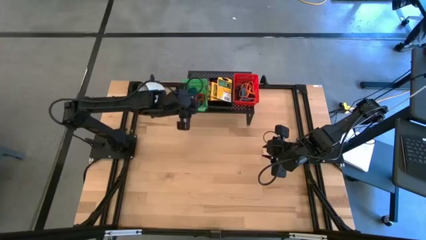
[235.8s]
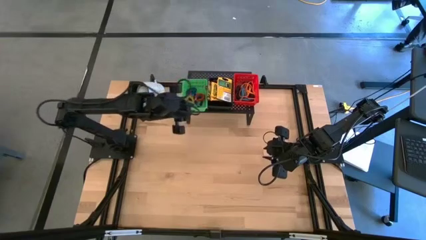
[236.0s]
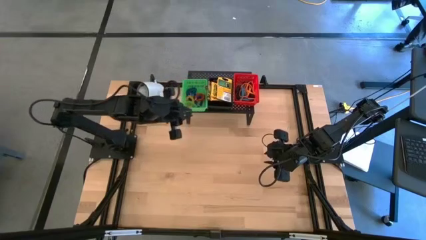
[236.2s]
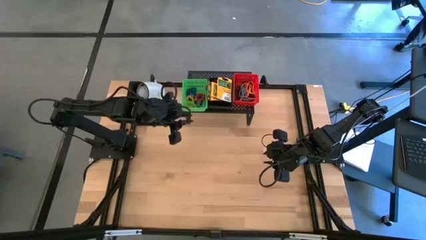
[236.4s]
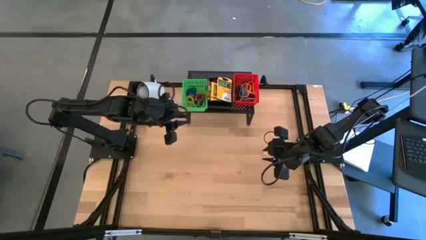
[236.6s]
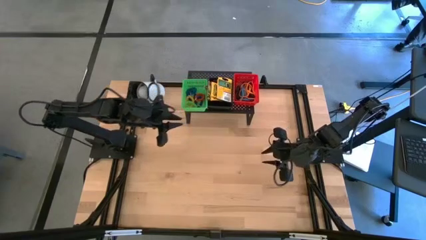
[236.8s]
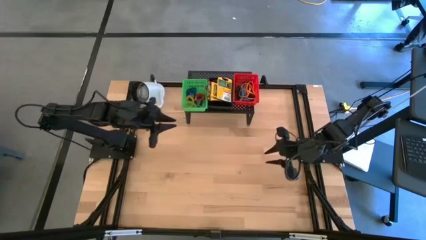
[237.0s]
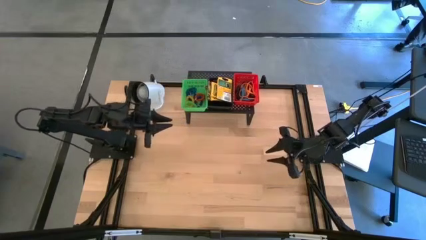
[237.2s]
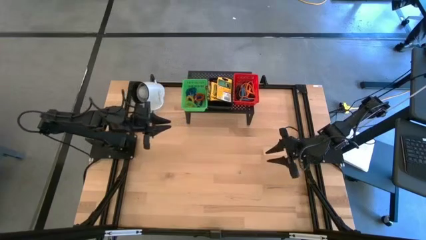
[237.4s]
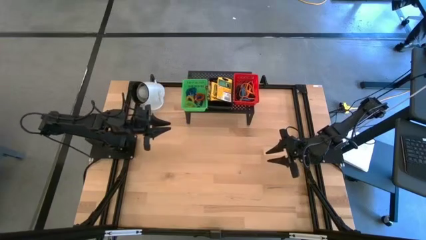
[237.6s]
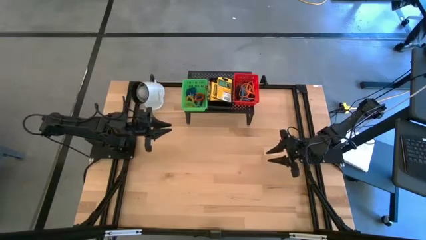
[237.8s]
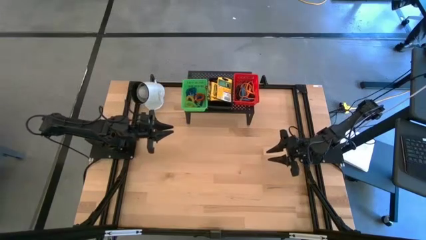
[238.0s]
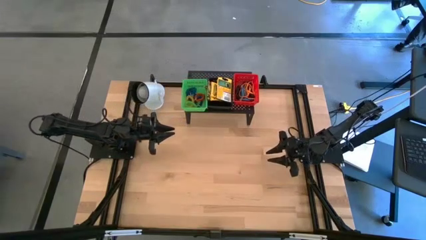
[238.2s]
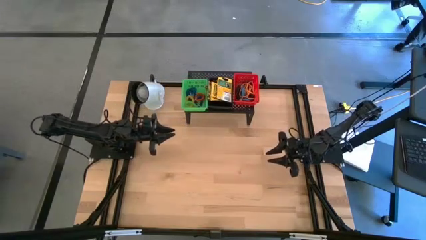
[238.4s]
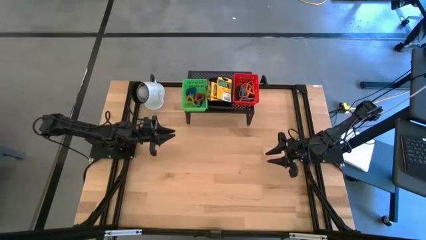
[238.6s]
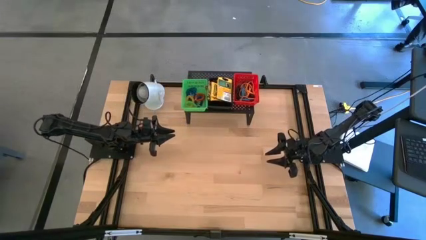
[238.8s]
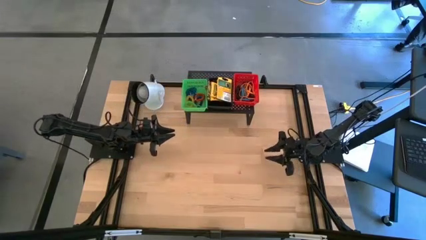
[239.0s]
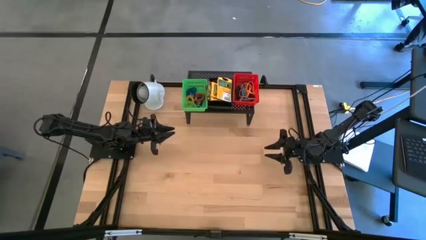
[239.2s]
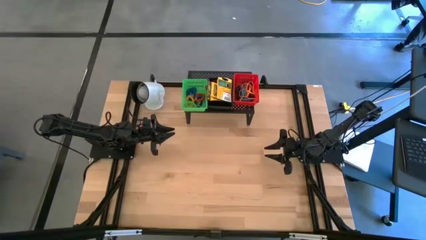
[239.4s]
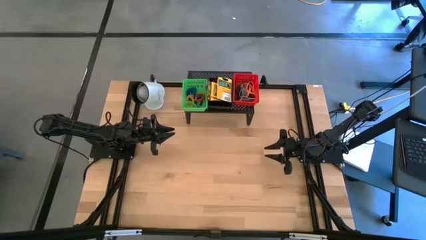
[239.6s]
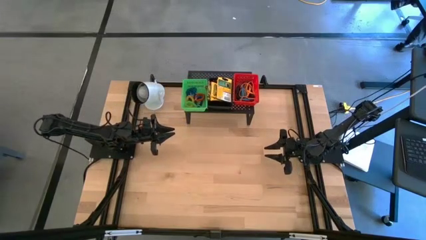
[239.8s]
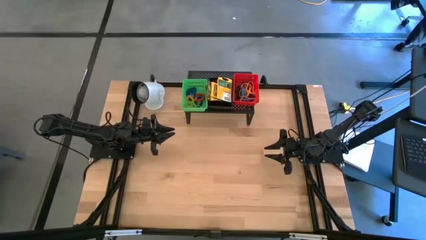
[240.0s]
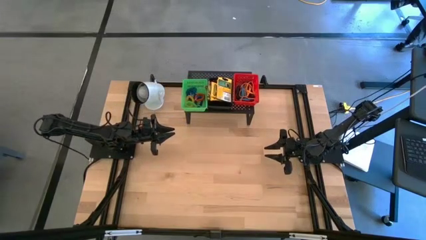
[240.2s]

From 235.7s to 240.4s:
Task: Pick & Place Office Desk Supplies
Return to Home Position

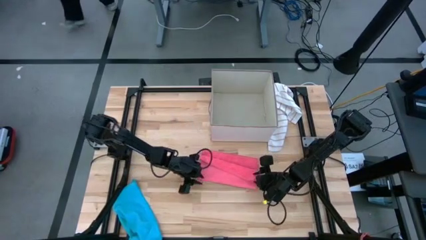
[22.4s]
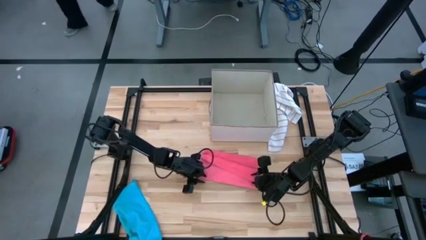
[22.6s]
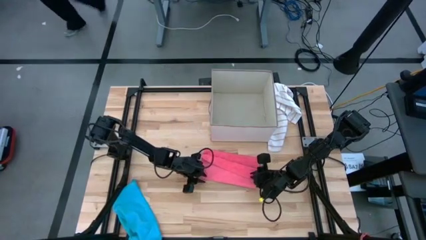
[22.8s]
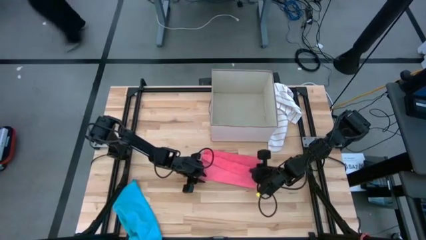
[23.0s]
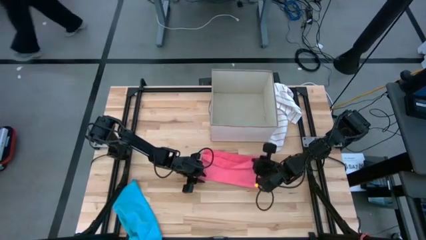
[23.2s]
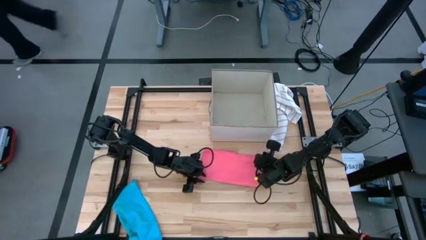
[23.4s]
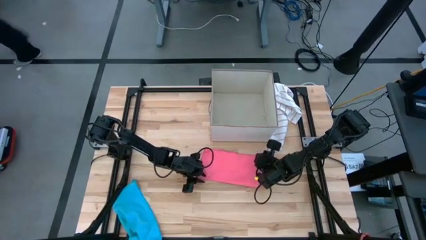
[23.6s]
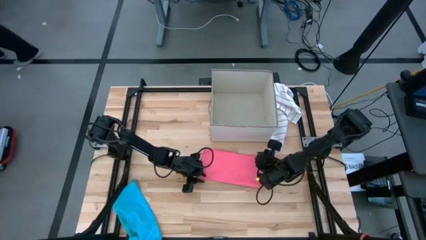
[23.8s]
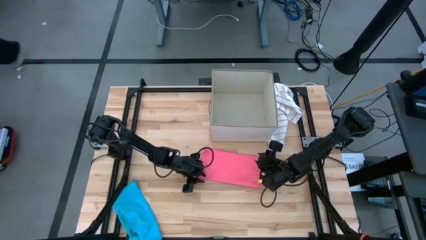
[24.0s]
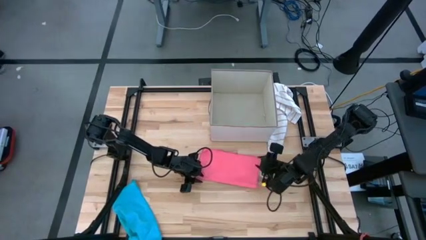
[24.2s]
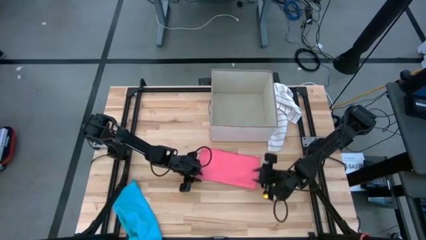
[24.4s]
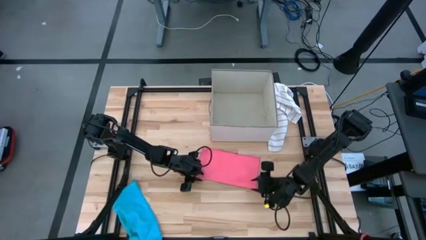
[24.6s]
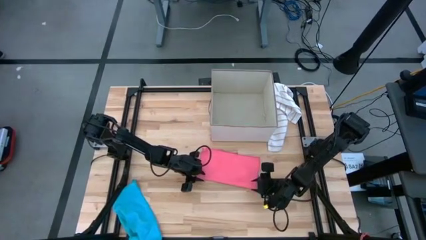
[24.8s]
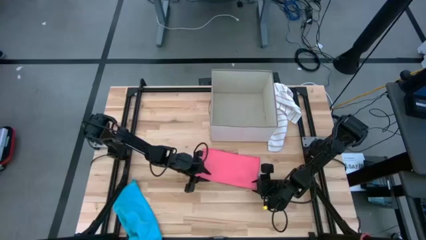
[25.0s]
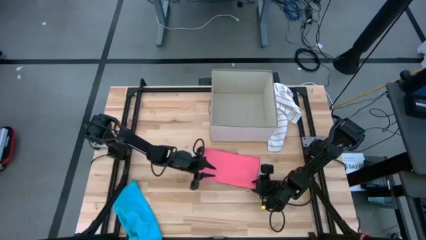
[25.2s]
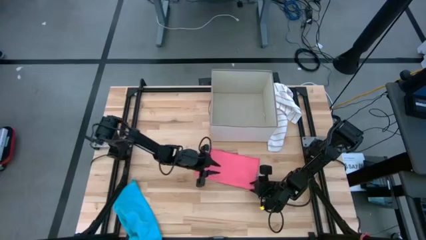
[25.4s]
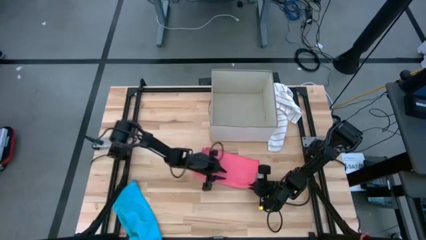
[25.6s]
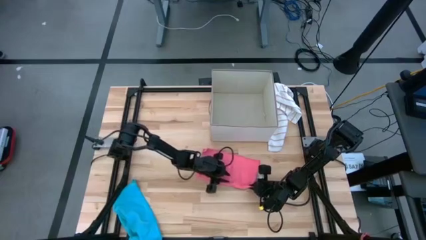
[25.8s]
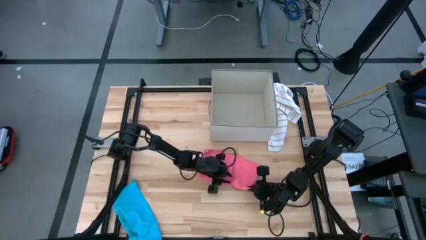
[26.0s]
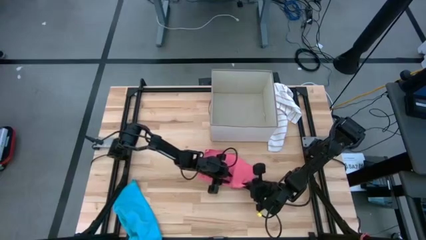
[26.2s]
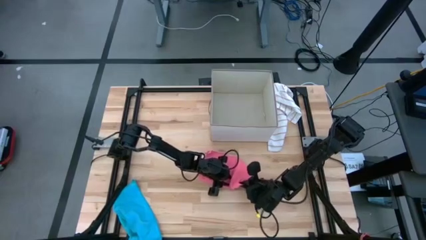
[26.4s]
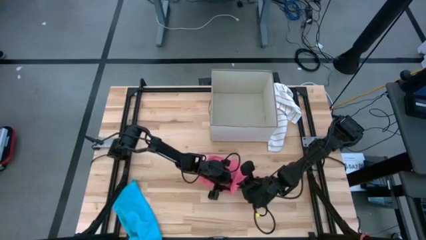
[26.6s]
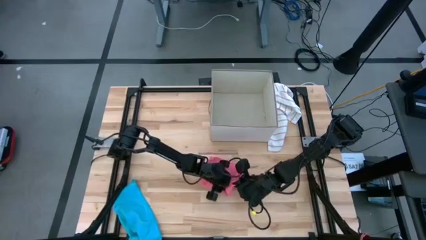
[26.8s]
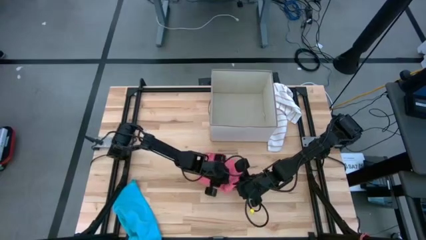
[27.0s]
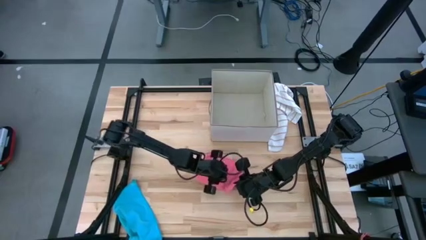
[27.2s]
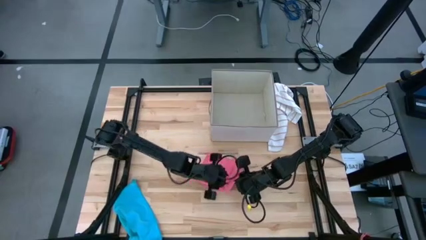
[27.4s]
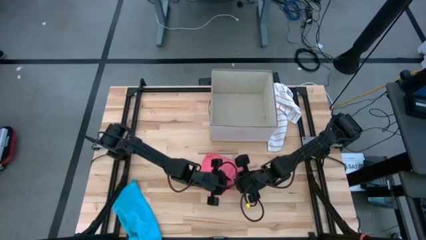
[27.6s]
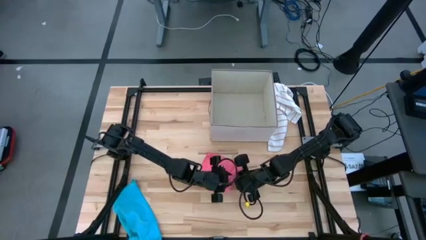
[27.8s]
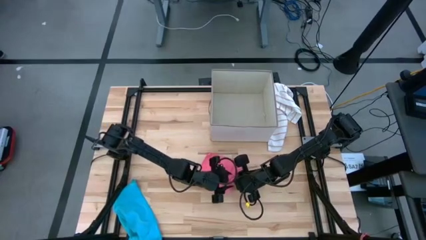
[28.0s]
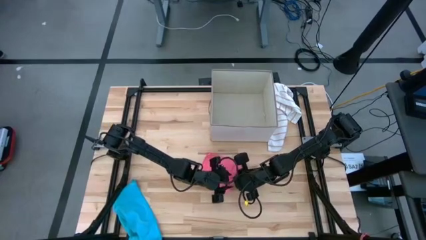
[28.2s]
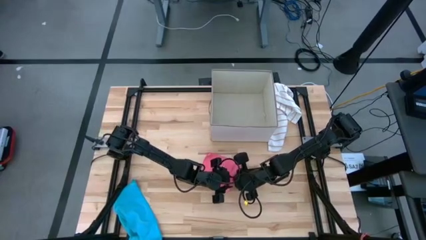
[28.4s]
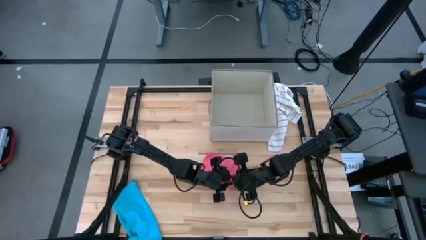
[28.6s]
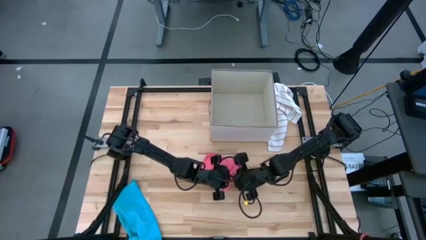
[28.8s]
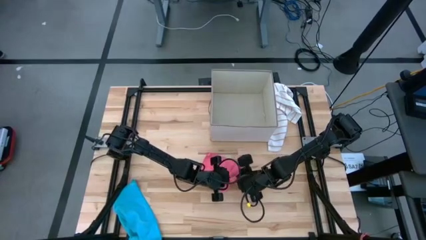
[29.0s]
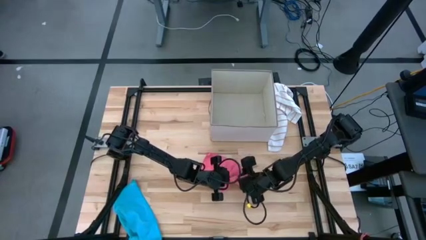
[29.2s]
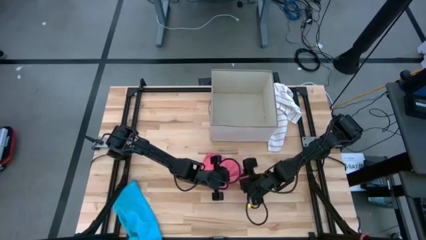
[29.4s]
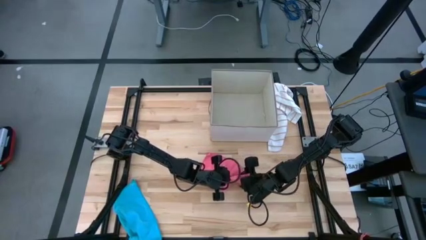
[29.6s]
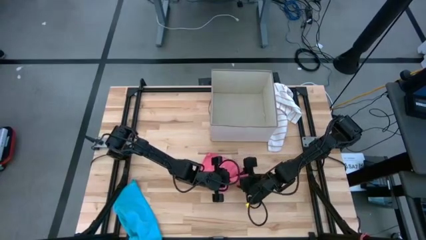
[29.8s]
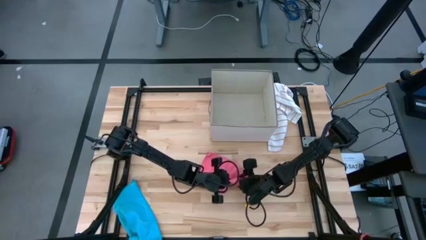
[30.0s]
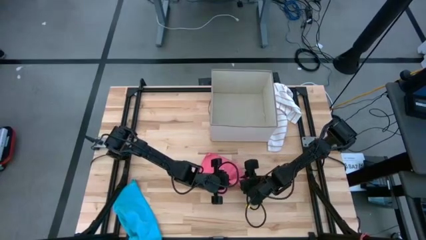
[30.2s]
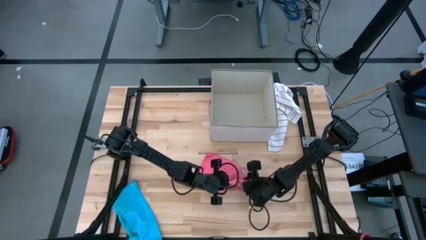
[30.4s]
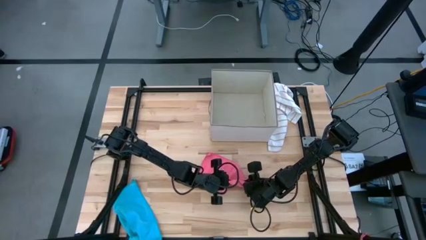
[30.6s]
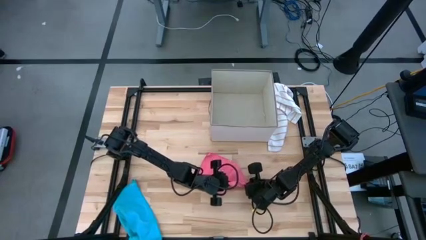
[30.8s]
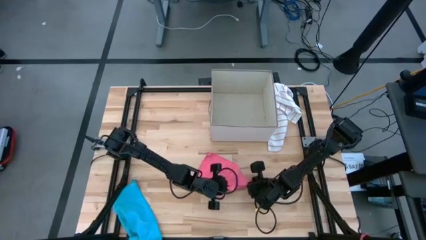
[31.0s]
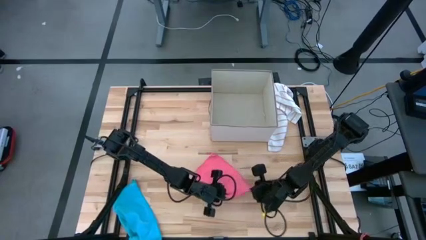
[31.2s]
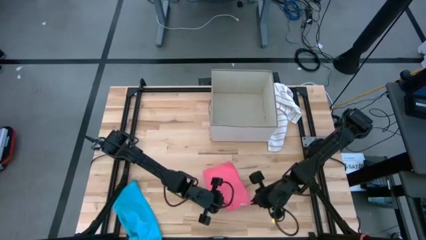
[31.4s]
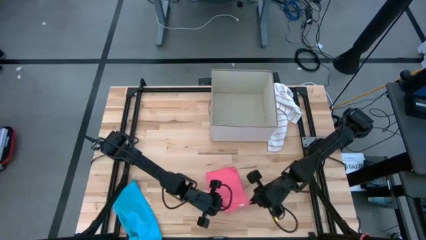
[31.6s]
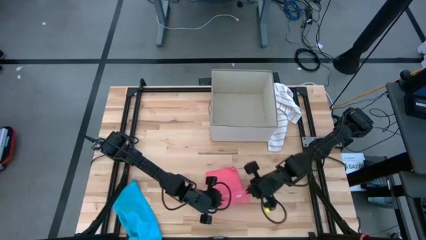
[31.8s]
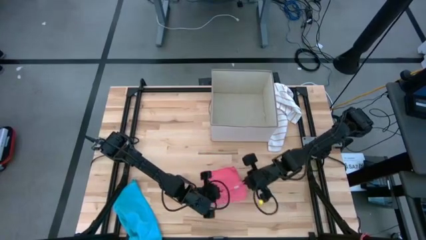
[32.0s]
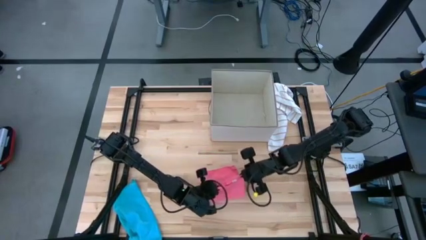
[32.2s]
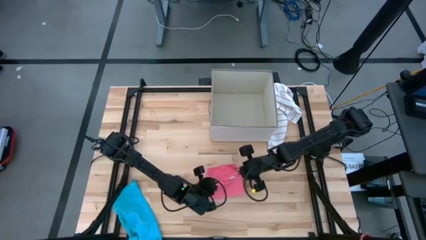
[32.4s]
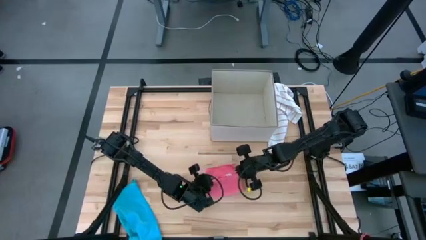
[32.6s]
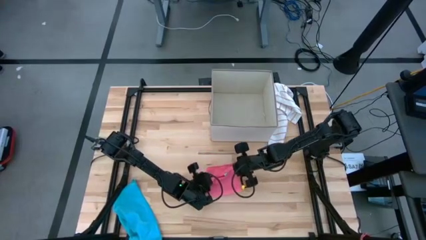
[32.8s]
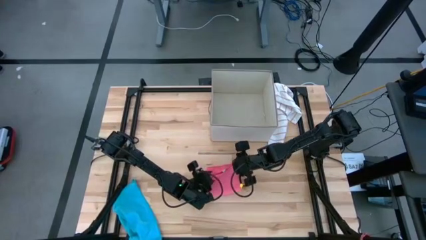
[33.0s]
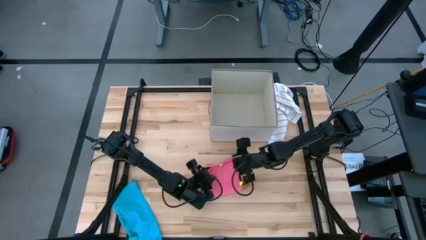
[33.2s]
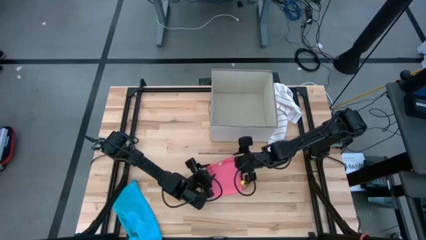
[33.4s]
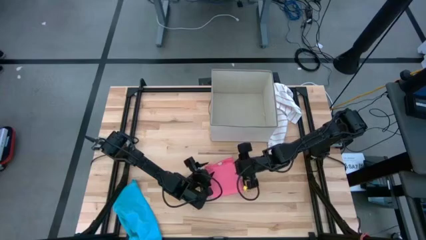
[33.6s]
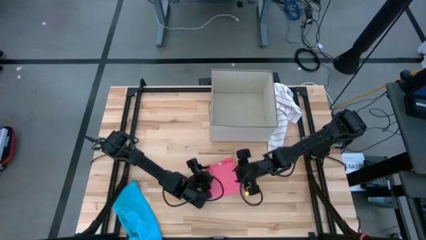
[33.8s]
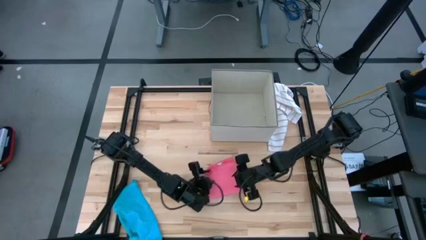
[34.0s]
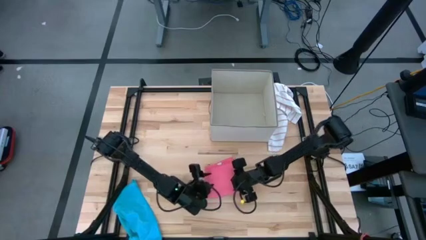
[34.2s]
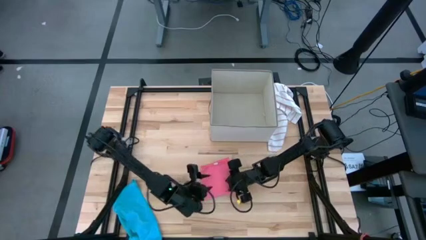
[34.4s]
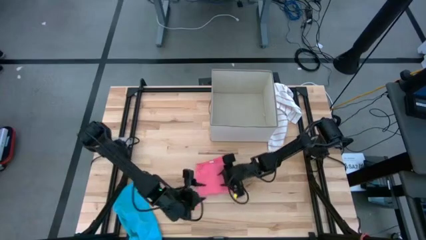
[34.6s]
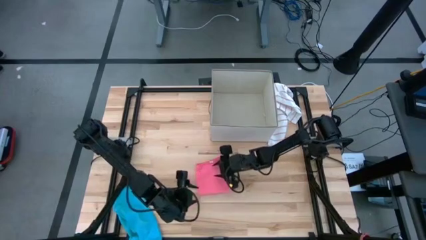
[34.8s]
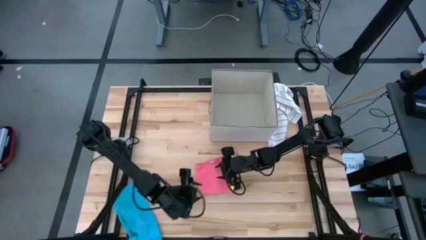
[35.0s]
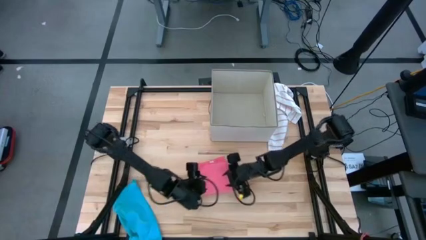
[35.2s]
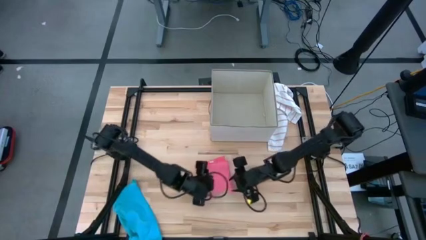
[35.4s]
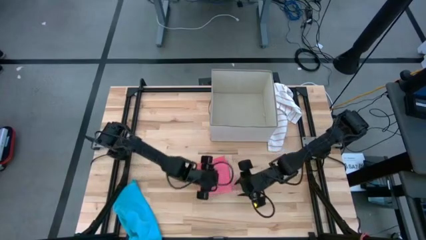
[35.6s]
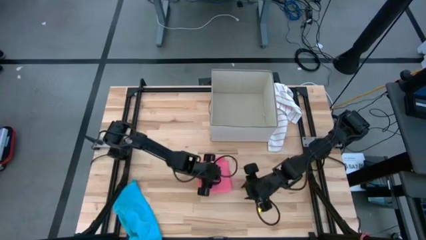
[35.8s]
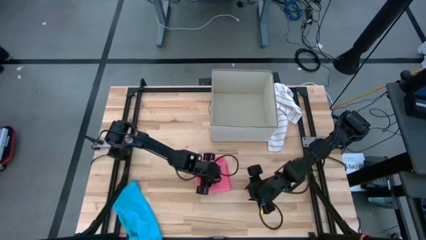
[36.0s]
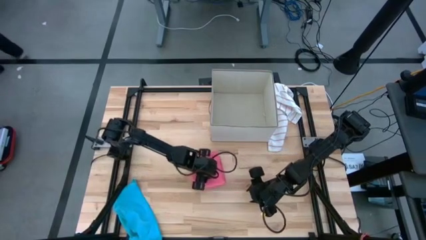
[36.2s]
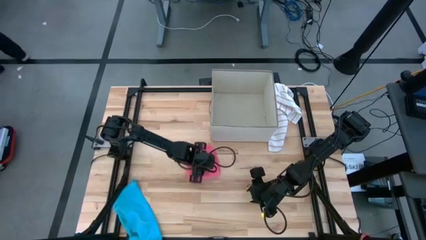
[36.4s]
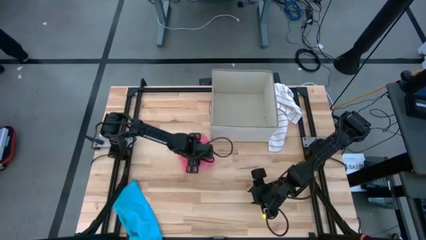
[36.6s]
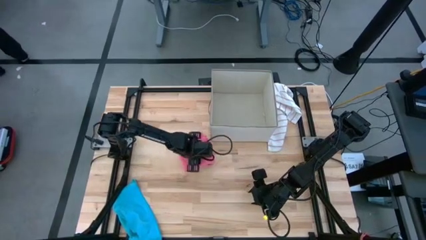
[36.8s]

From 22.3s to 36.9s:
Task: Fold towel
Fold the pink microfiber towel
